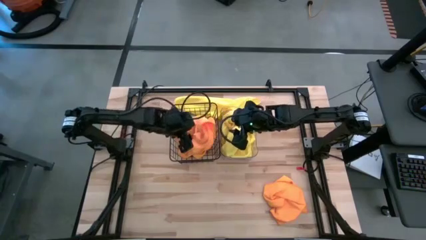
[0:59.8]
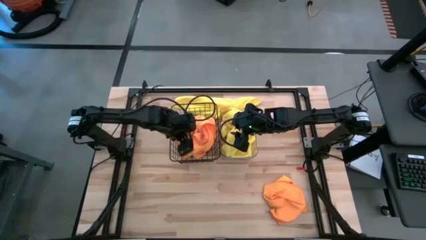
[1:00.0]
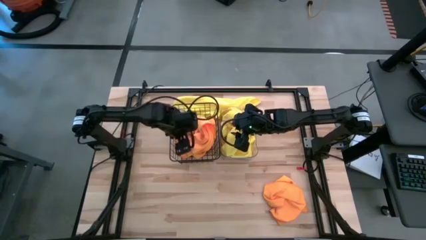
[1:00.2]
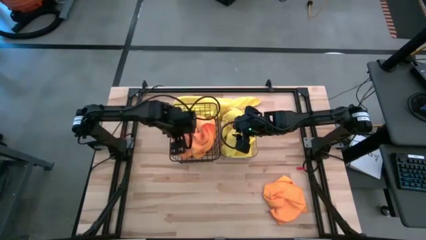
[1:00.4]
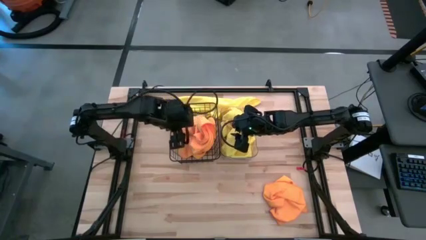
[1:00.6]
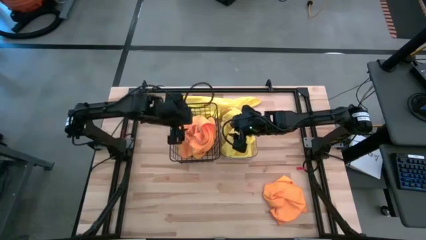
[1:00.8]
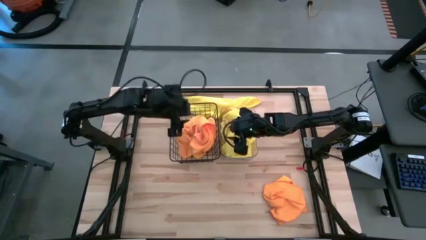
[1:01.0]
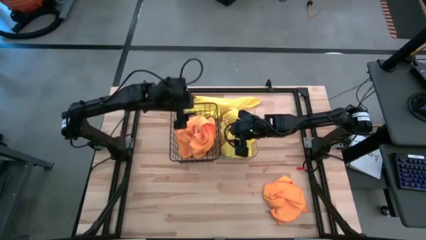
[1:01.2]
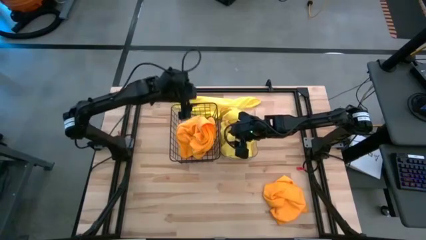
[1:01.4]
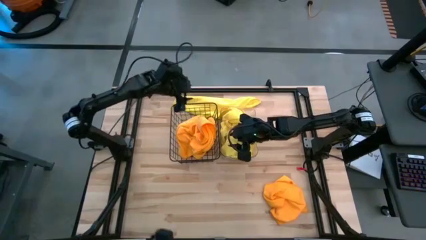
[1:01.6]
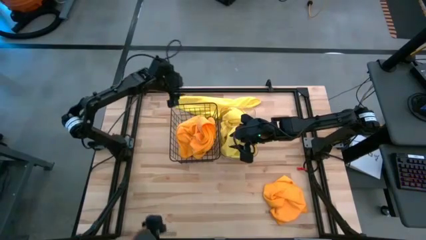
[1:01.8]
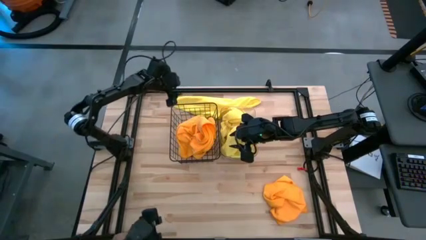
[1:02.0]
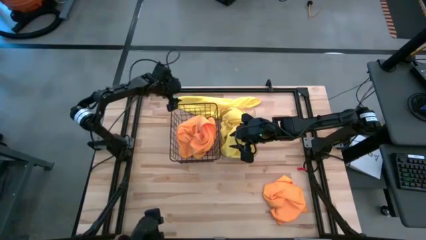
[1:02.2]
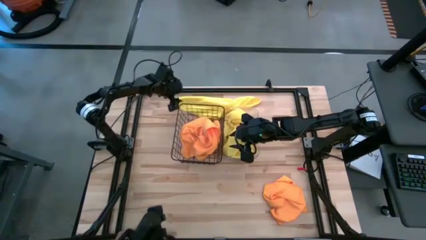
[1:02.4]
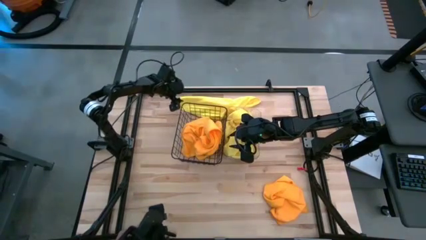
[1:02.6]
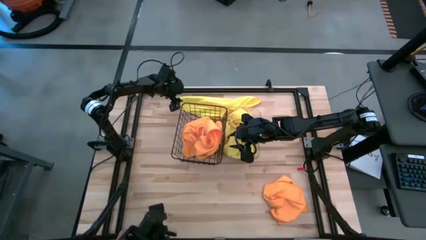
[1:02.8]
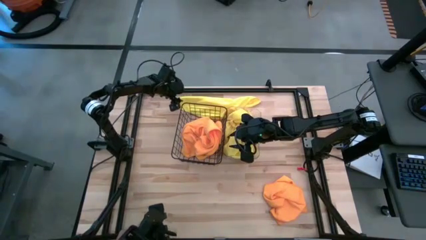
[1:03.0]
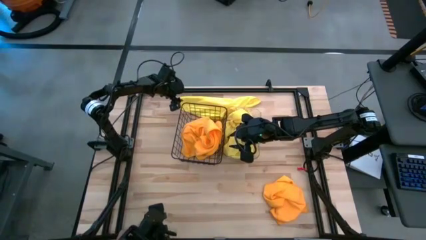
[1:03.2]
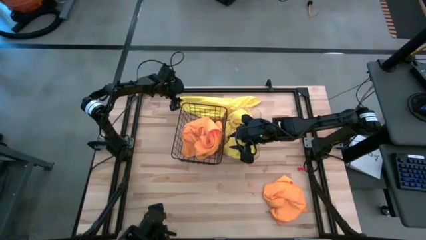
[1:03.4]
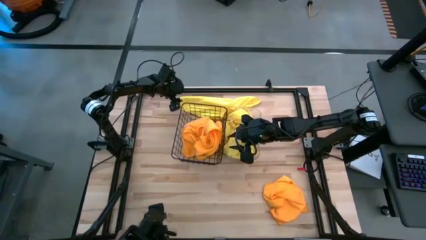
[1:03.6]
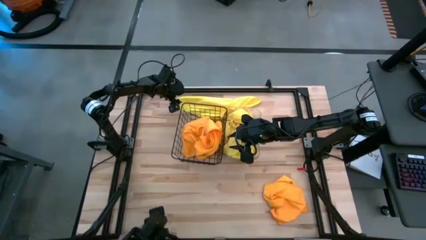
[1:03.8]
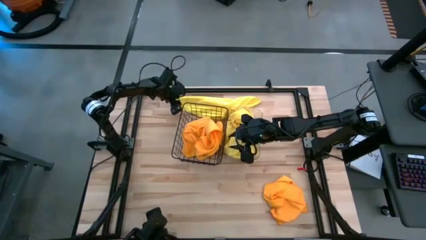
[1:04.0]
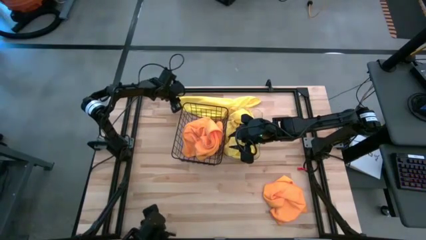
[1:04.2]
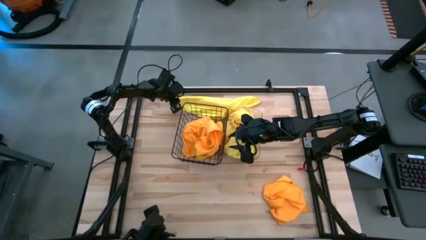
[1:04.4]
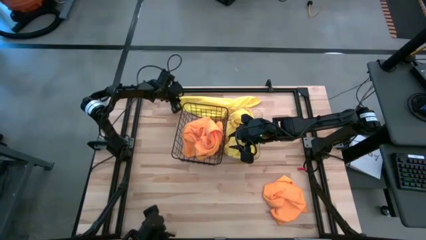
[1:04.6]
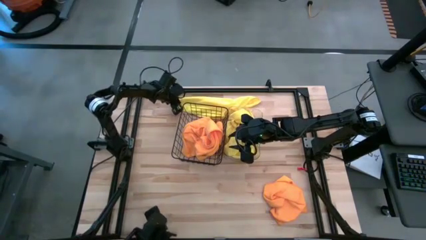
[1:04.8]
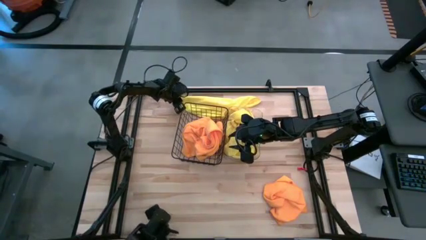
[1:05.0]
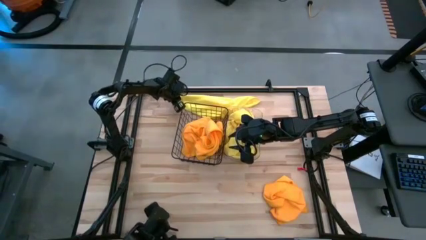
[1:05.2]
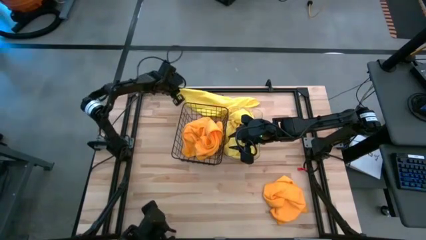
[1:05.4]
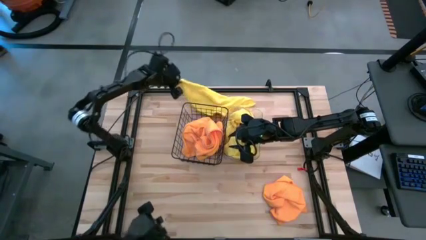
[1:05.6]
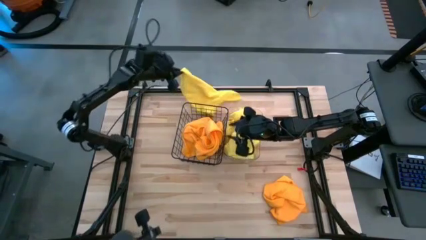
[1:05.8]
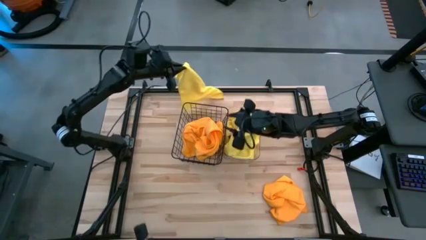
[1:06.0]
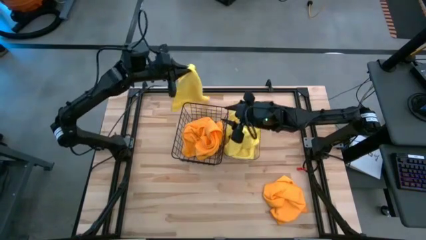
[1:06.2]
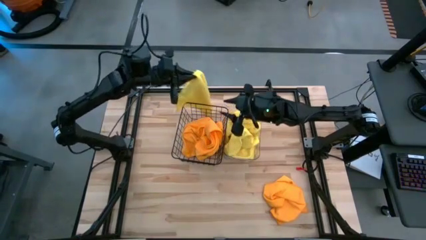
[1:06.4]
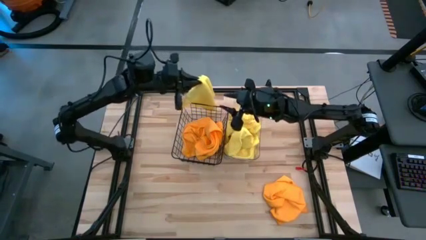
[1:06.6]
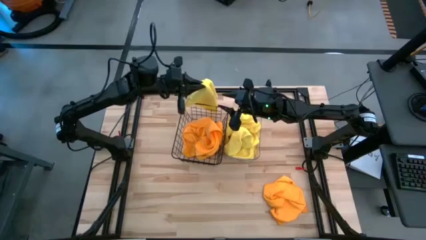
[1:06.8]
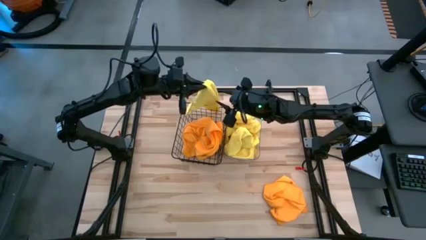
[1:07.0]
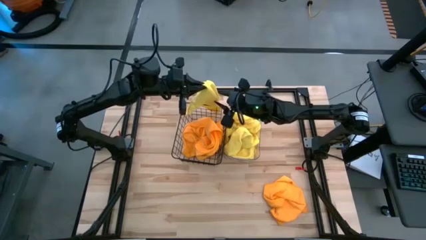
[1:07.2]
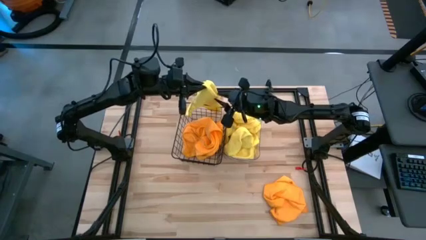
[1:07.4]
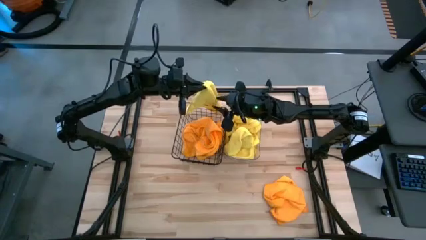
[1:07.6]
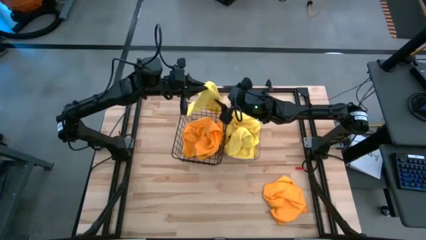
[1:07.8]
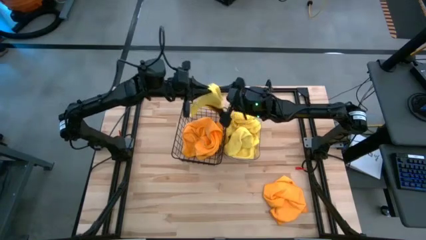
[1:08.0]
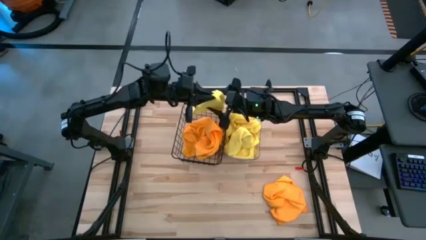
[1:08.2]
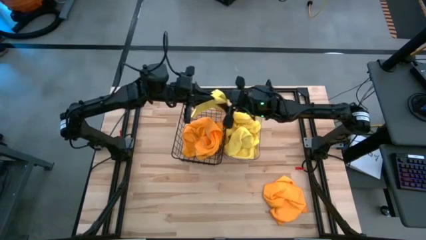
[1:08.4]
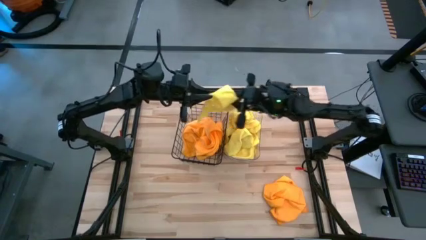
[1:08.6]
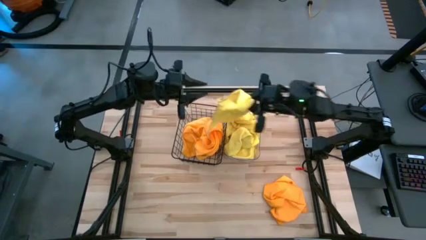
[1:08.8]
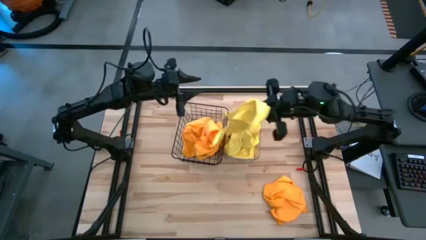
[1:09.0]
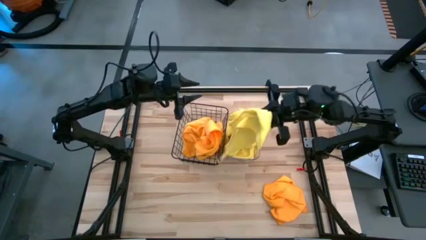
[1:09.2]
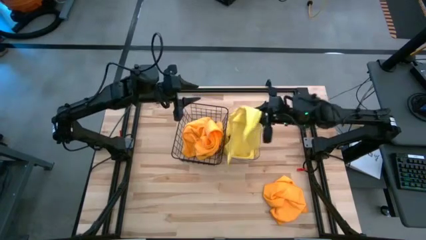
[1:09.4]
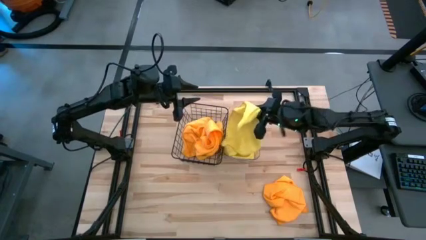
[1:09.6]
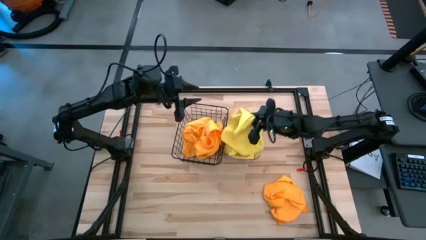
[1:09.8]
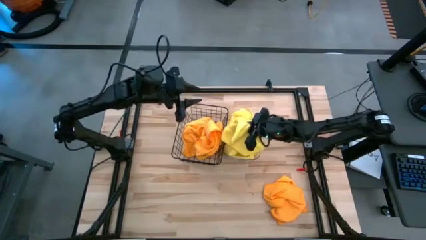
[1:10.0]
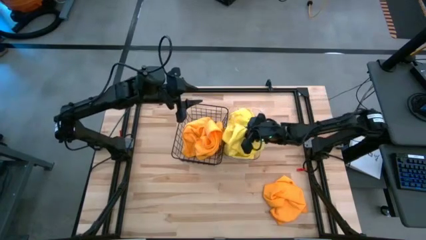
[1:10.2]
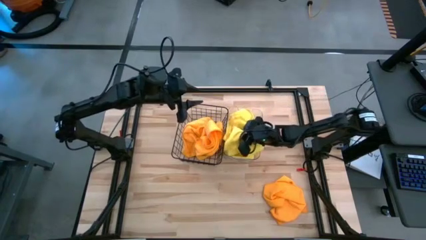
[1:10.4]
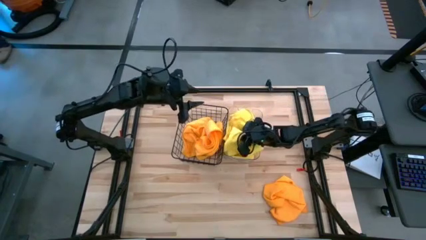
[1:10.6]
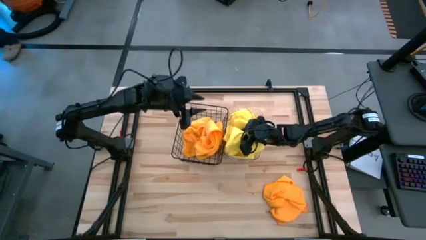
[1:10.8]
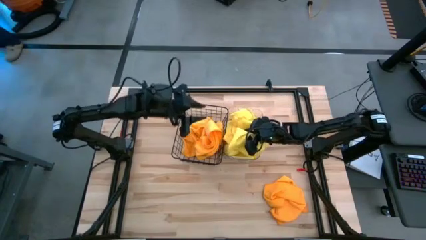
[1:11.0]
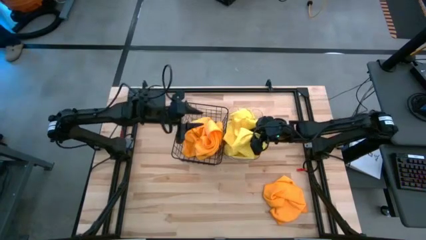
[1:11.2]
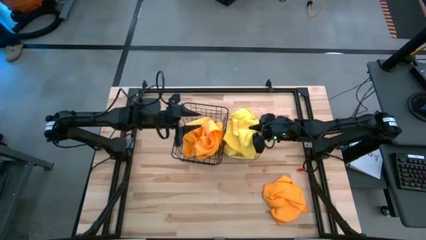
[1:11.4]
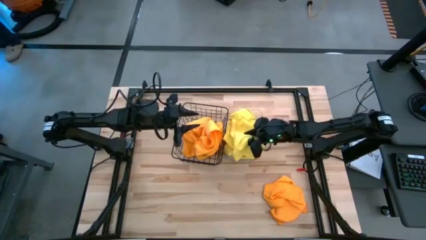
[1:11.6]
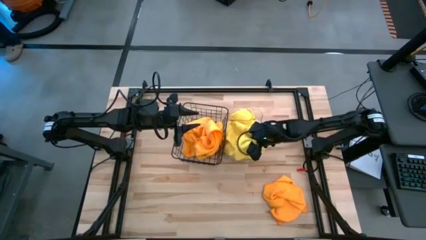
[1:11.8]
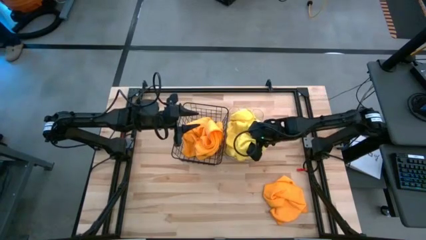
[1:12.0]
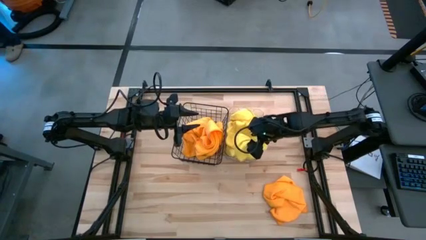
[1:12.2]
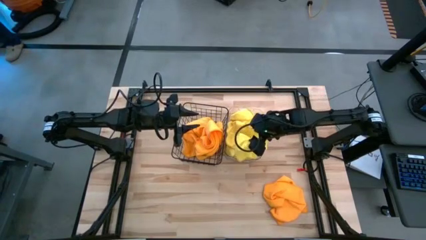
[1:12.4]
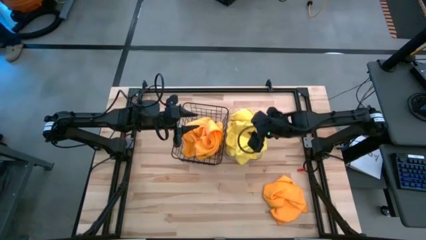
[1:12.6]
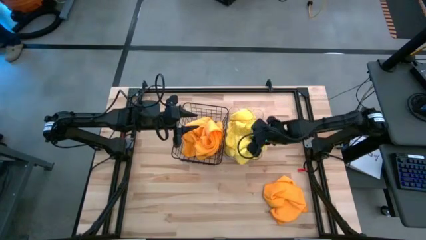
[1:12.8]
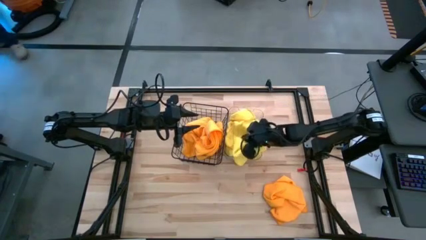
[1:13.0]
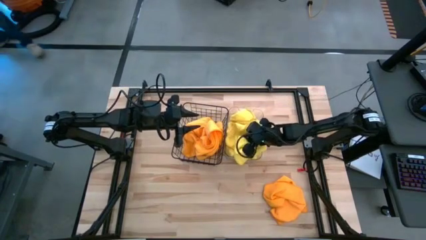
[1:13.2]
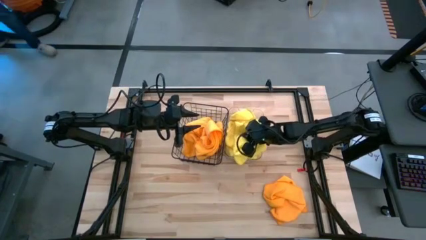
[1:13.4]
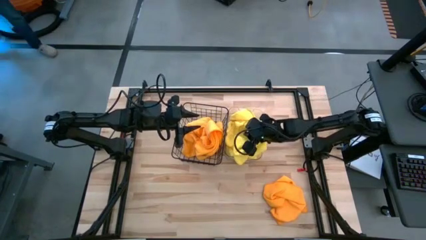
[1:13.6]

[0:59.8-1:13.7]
Task: Sort microfiber towel by color & place in baskets
Put the yellow microfiber towel into the transparent bin

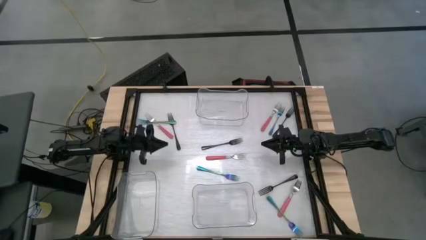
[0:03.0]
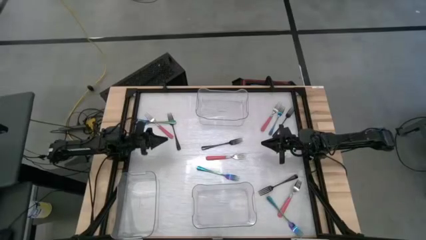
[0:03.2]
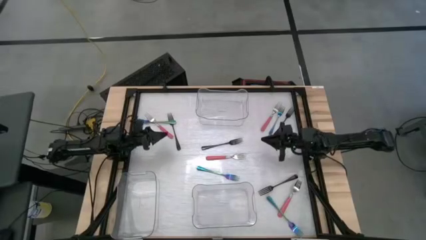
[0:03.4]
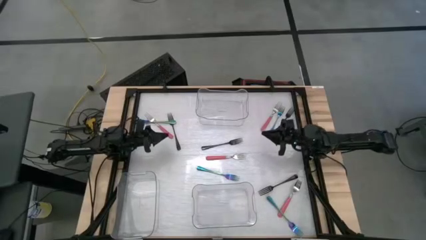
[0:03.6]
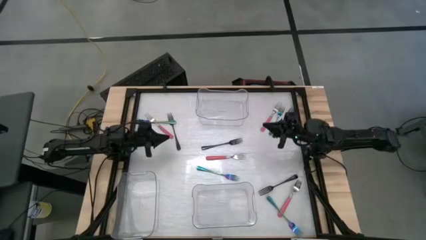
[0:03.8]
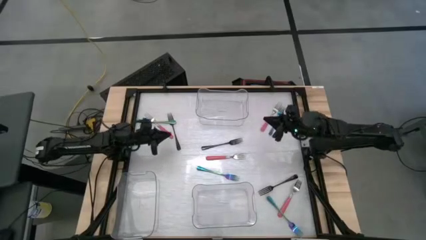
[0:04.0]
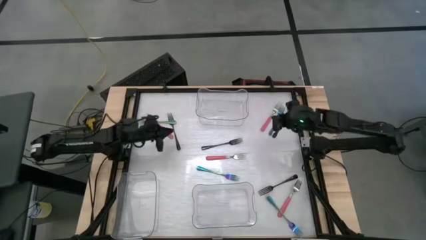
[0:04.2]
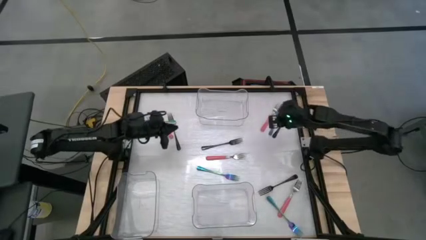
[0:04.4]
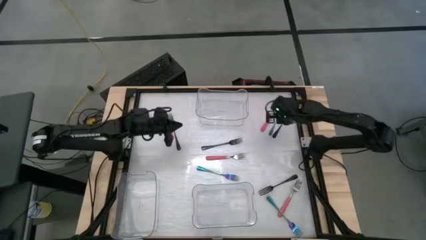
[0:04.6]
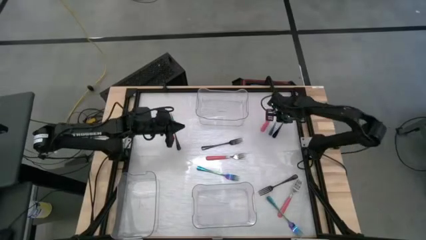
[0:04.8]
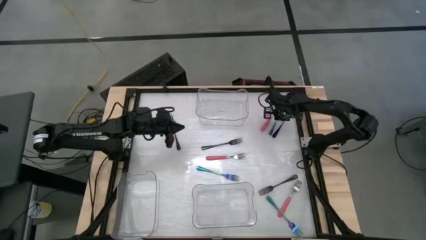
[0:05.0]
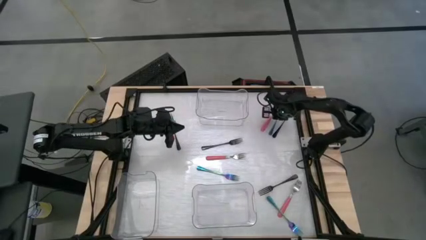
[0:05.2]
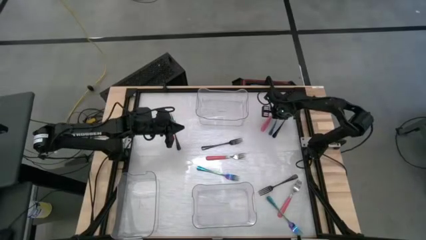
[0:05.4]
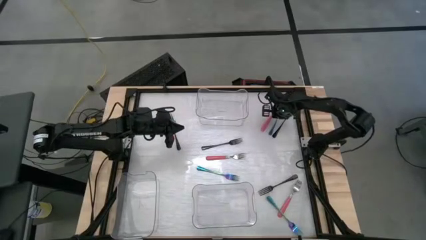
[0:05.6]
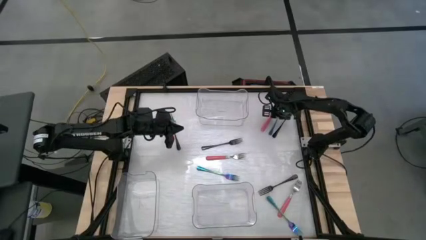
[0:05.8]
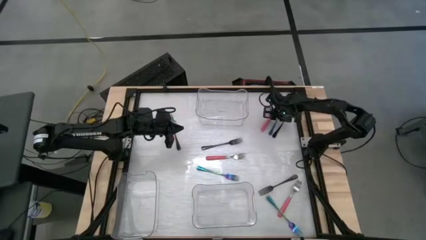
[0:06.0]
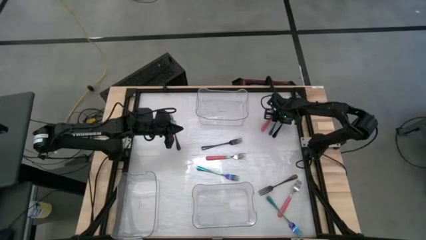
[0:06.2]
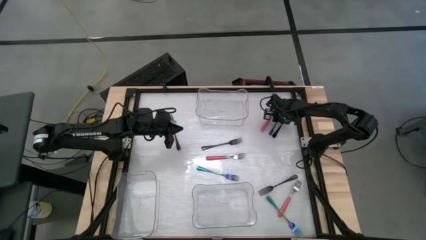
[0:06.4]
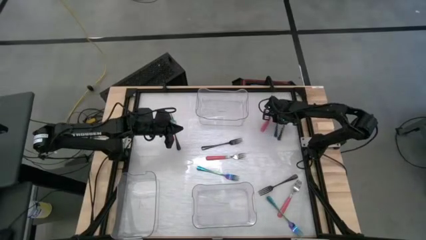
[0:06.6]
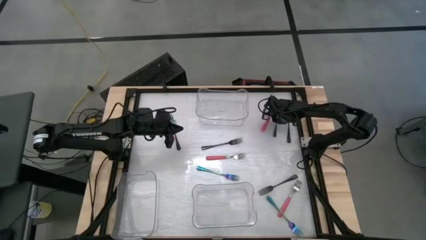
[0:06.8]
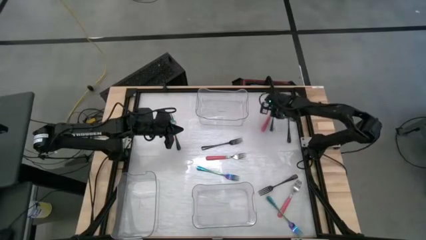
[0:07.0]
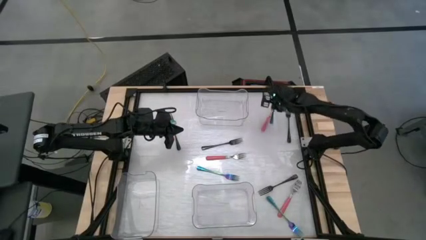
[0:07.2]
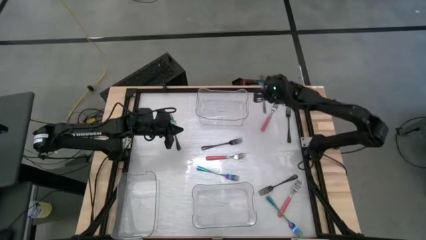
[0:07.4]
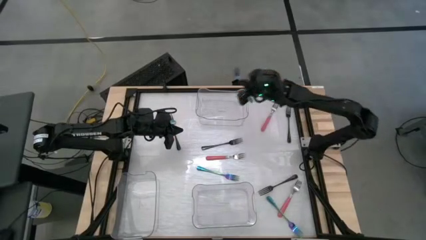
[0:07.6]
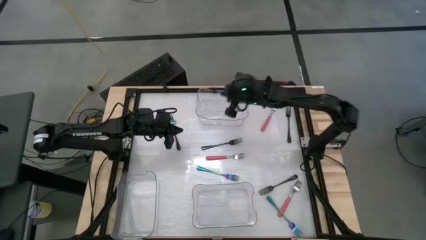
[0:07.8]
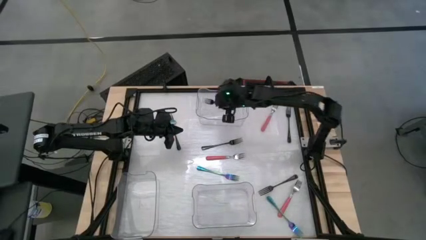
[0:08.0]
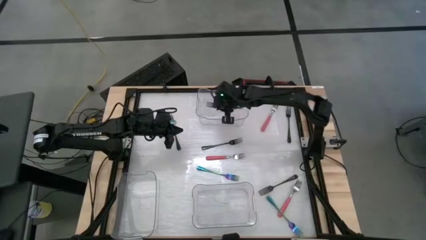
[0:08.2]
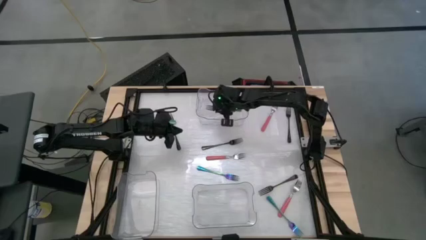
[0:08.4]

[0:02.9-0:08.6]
Task: Sort silverware by color (type)
Put the blue fork into the top transparent bin
